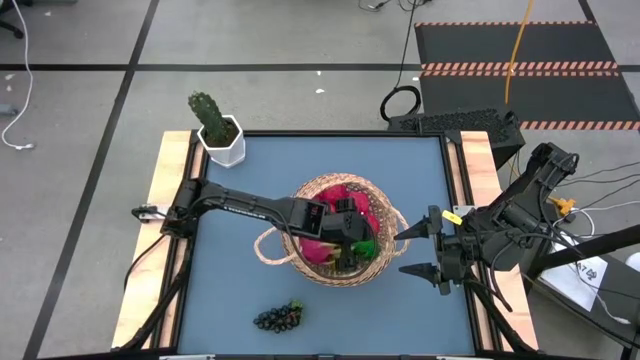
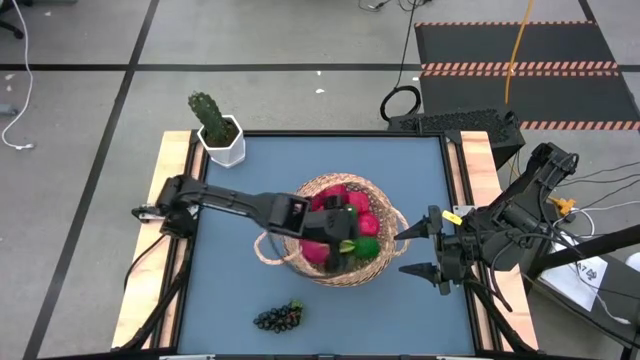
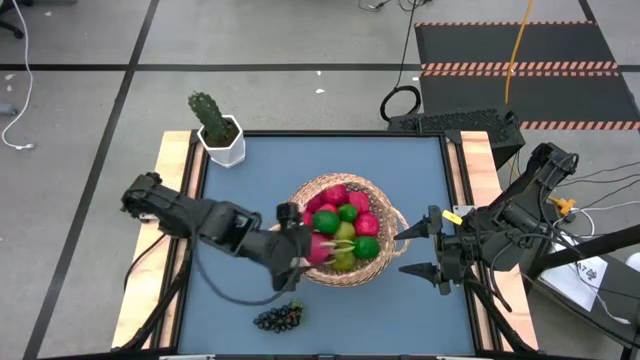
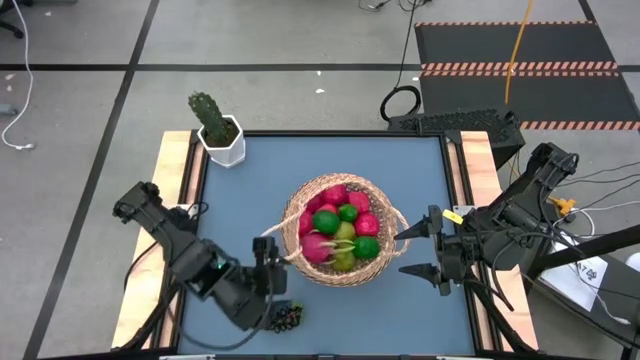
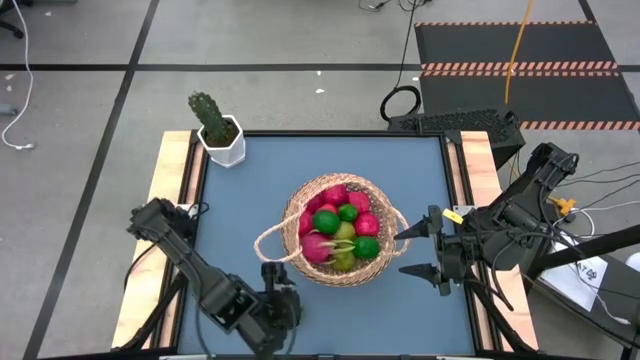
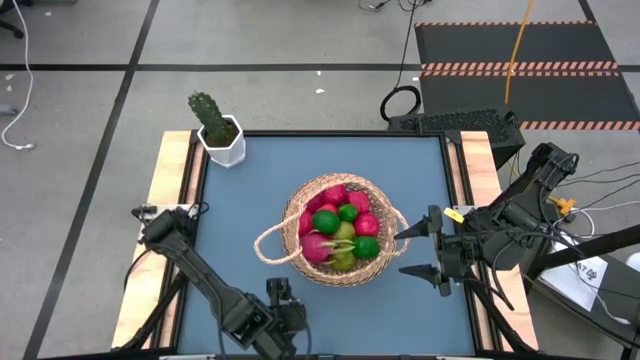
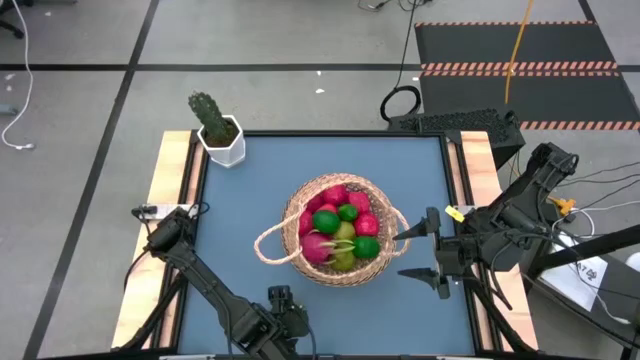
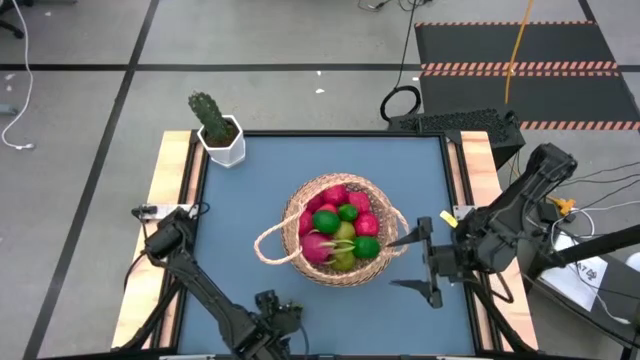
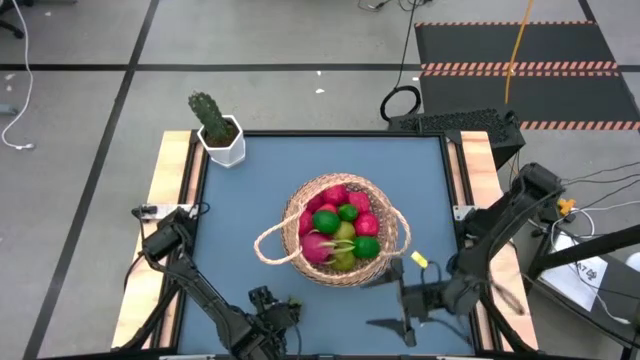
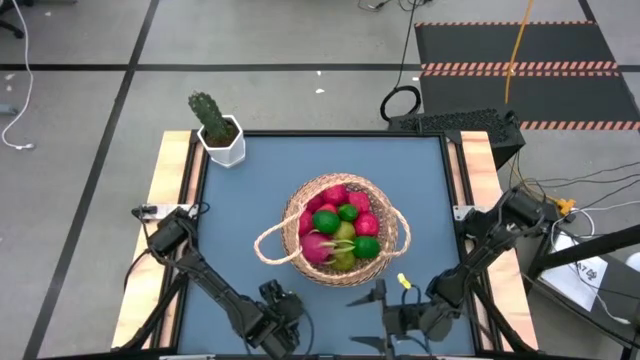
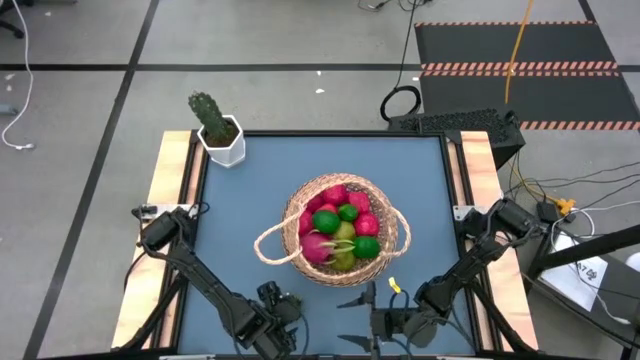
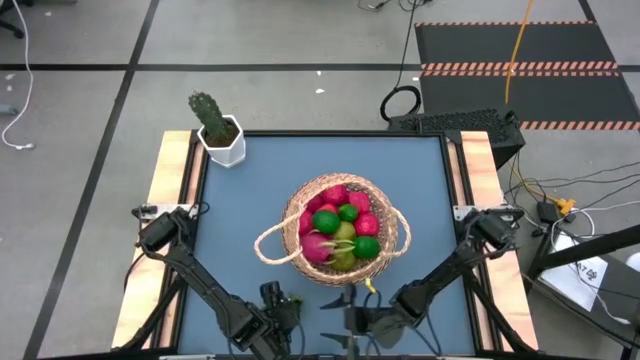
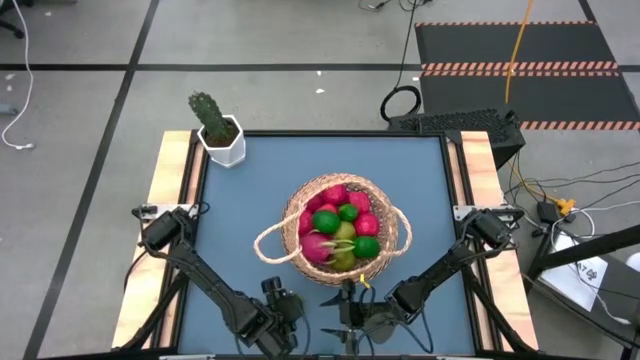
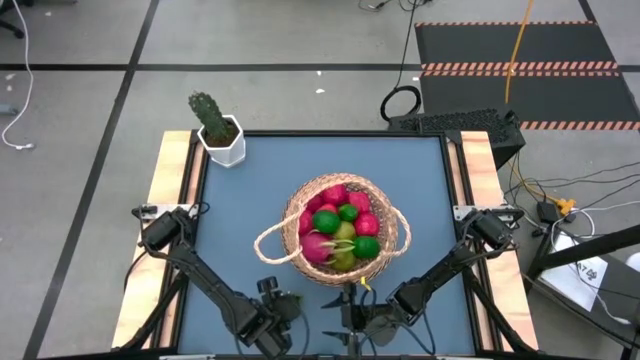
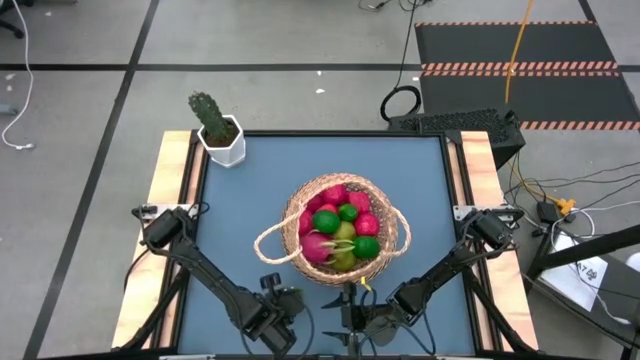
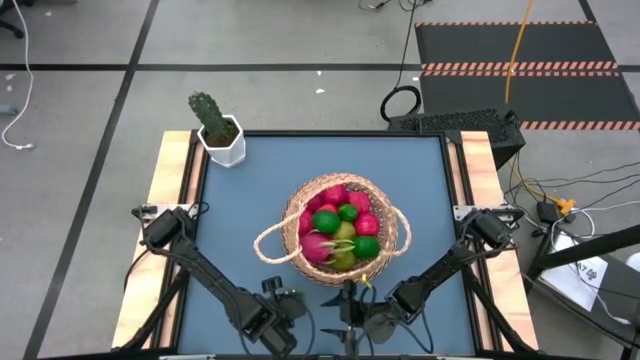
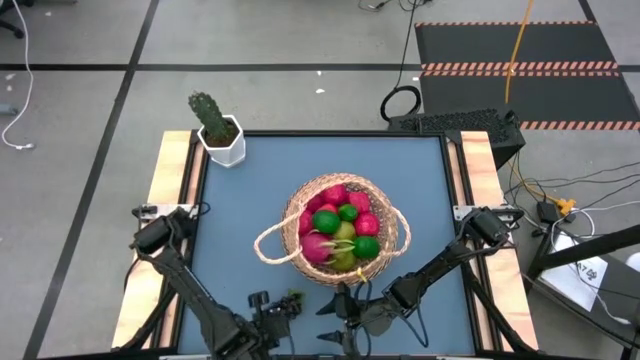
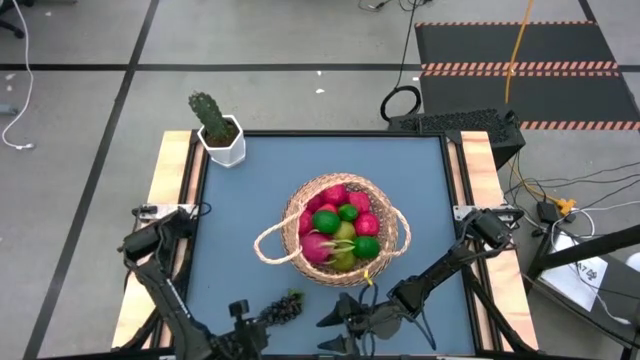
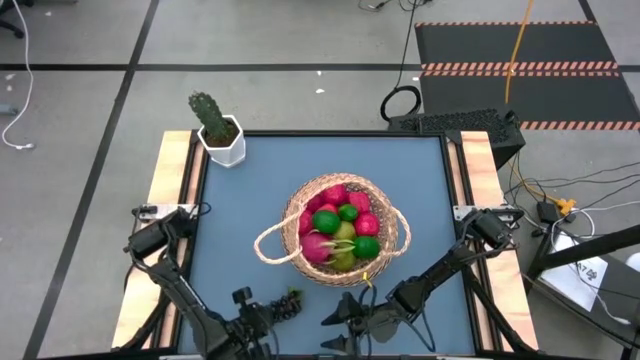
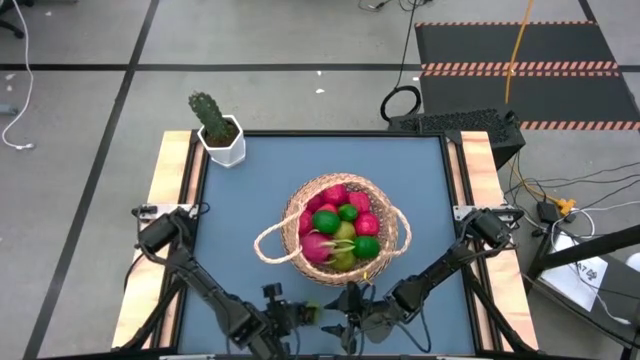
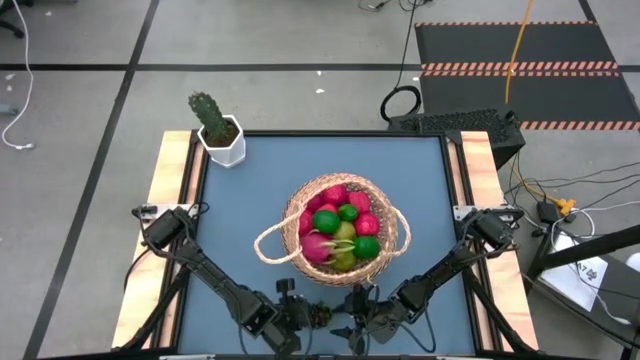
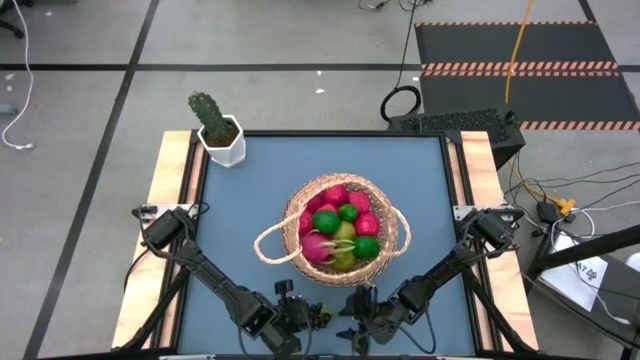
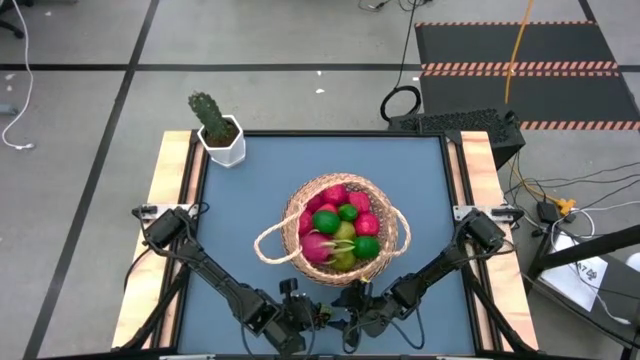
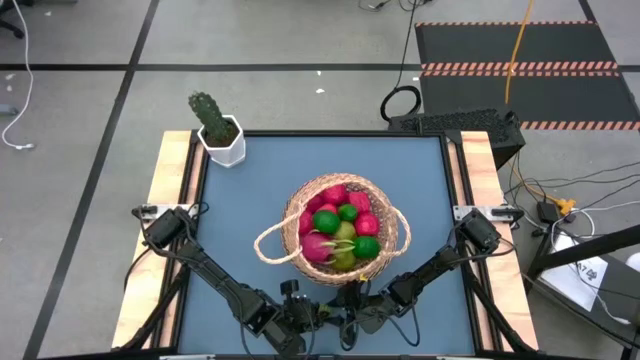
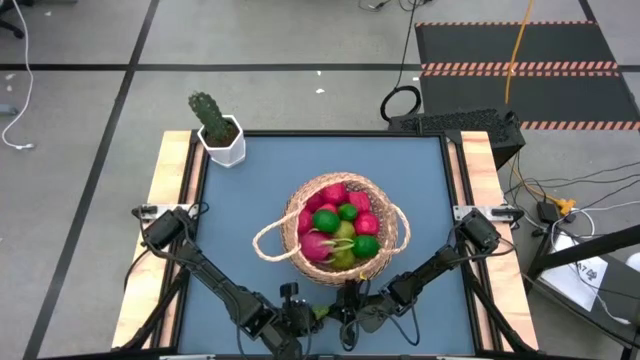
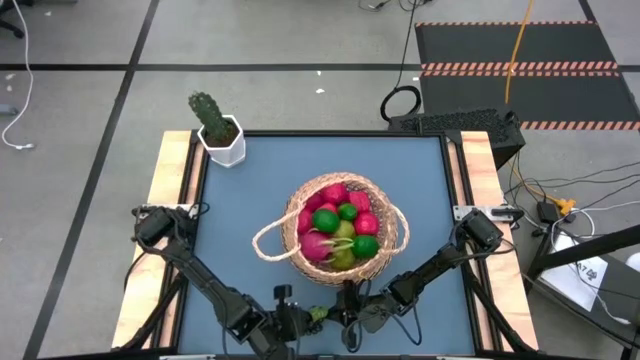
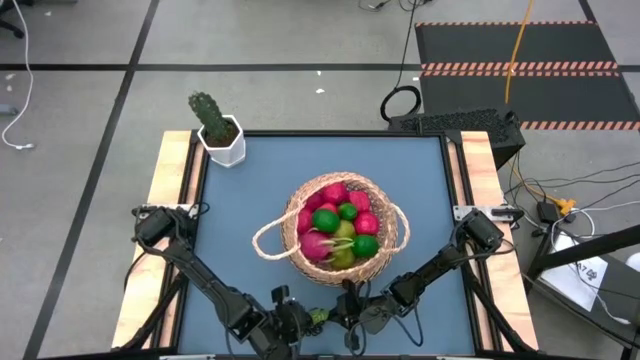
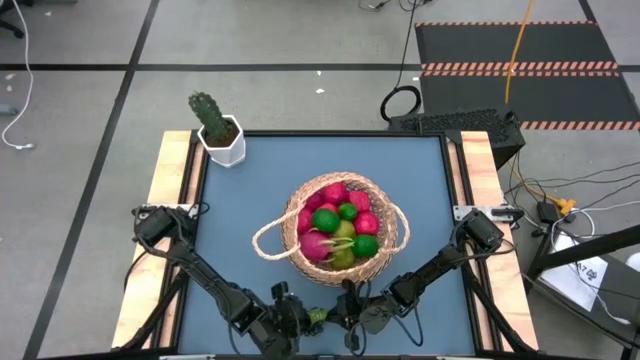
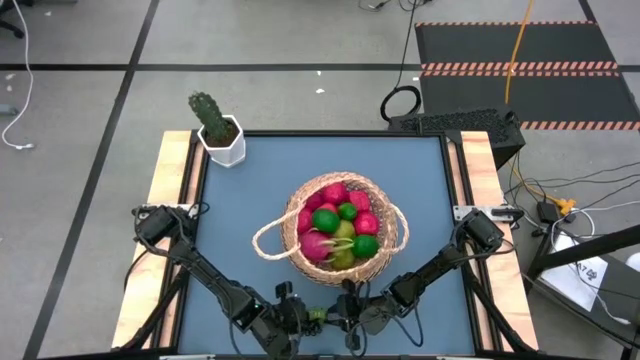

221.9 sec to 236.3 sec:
Task: Build produce basket
Put the black grapes into the brown basket

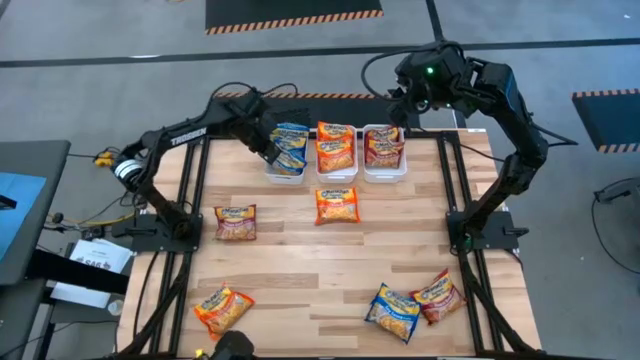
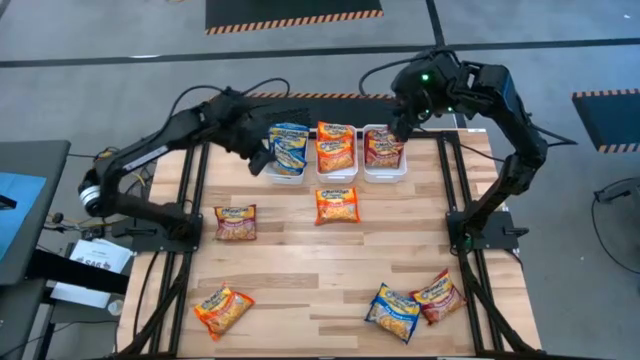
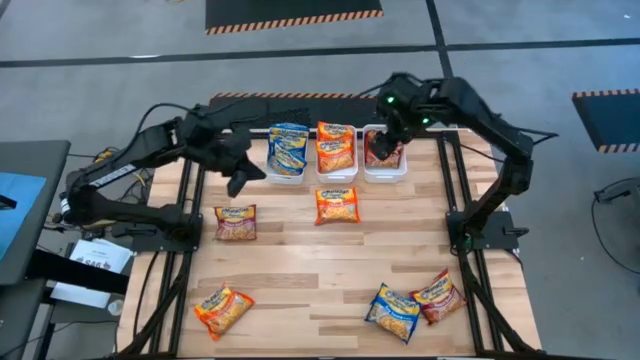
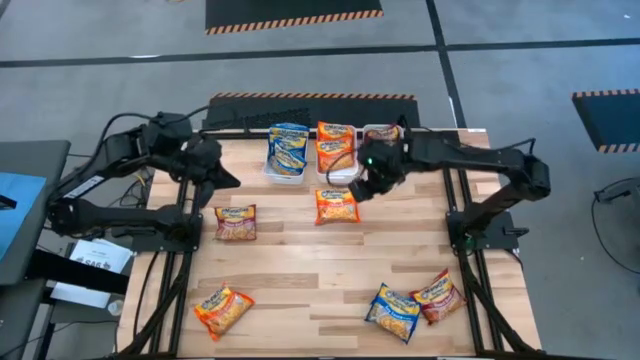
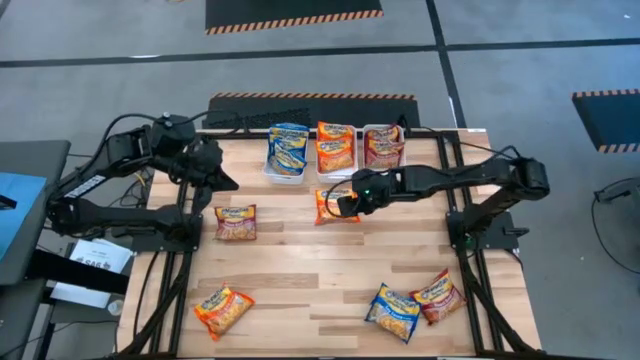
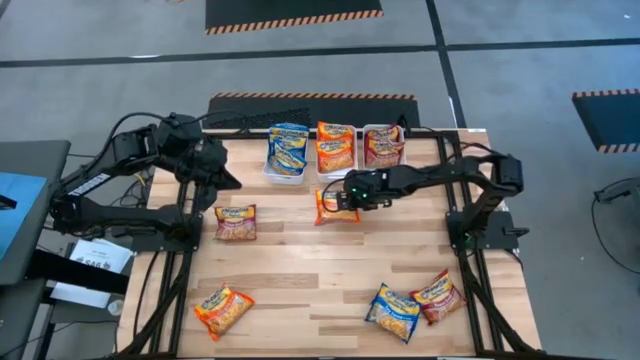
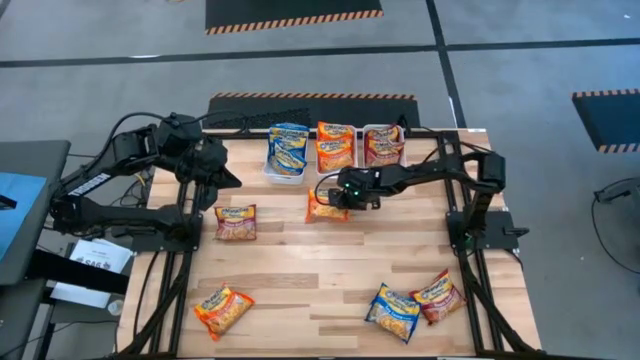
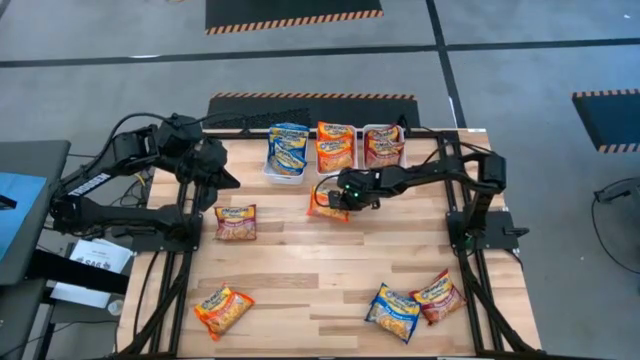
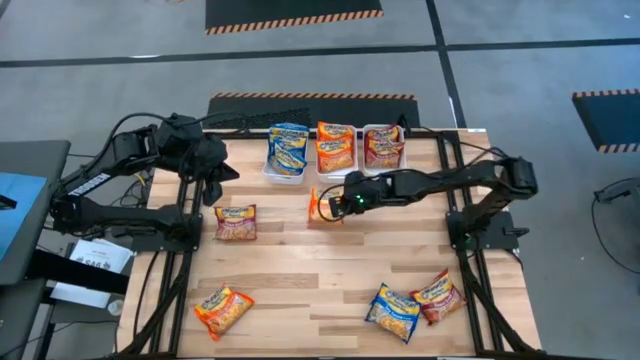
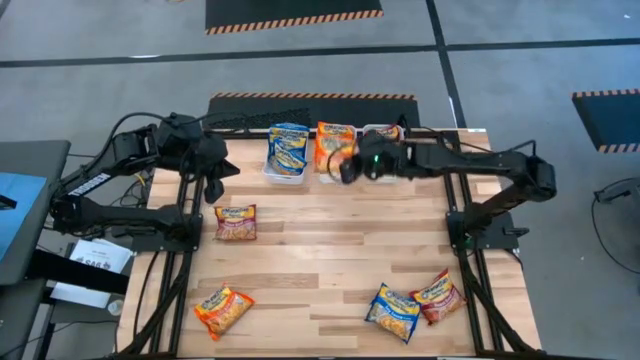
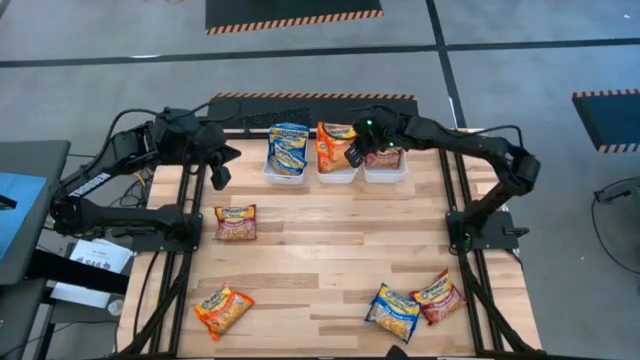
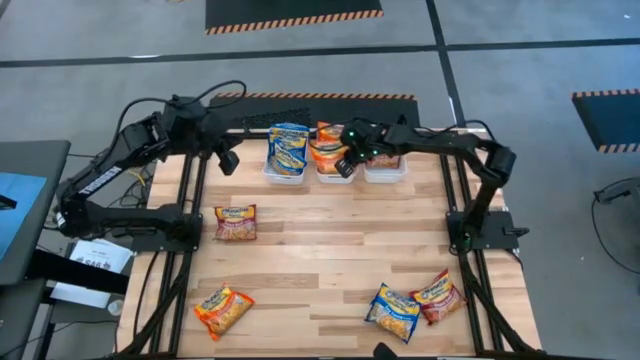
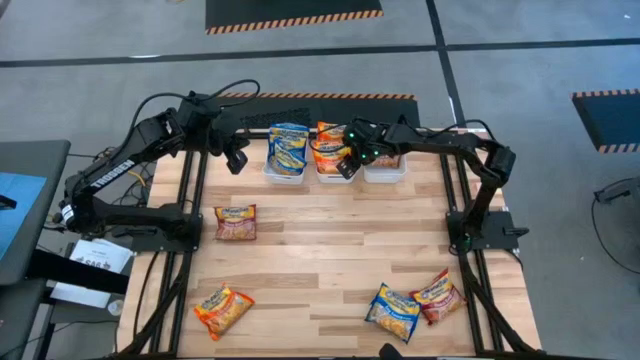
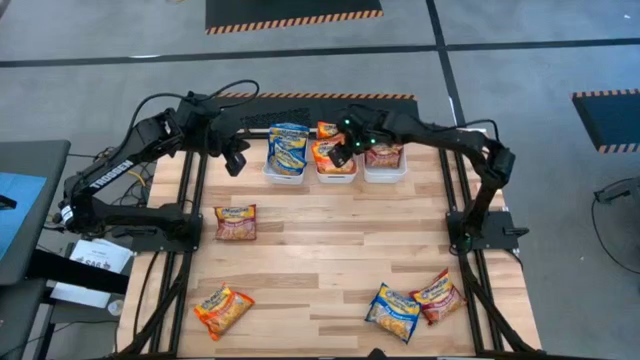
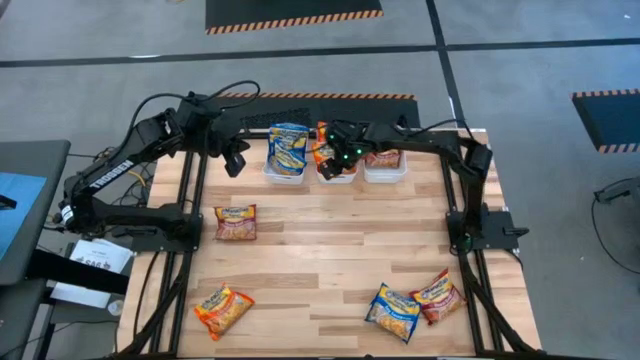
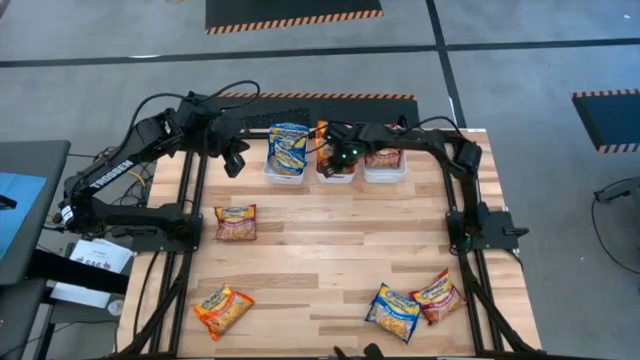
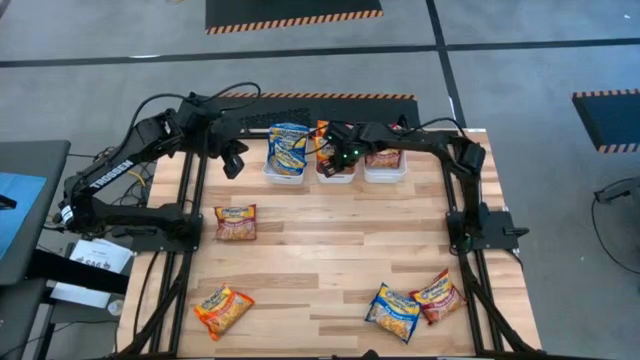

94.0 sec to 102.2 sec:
Task: Sort Maruchan noodles
Put the orange noodle pack into the center white bin
